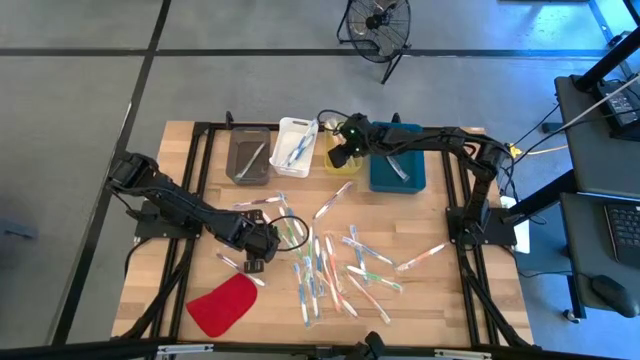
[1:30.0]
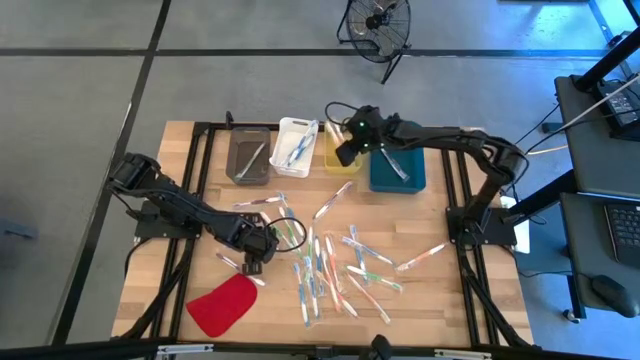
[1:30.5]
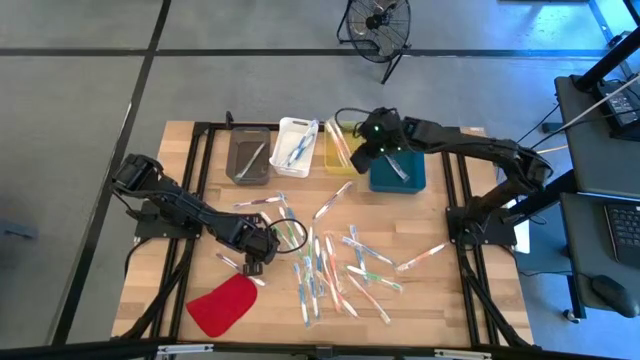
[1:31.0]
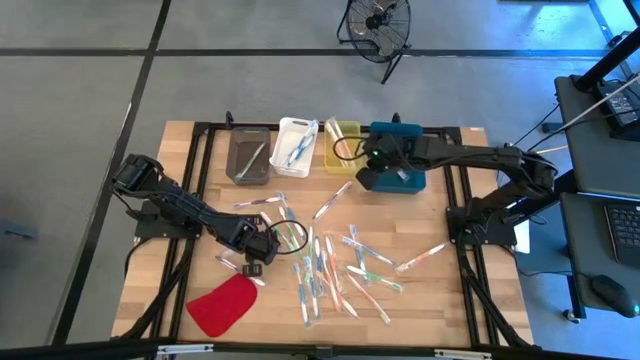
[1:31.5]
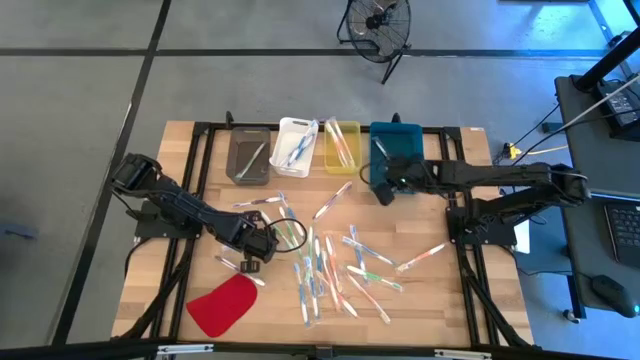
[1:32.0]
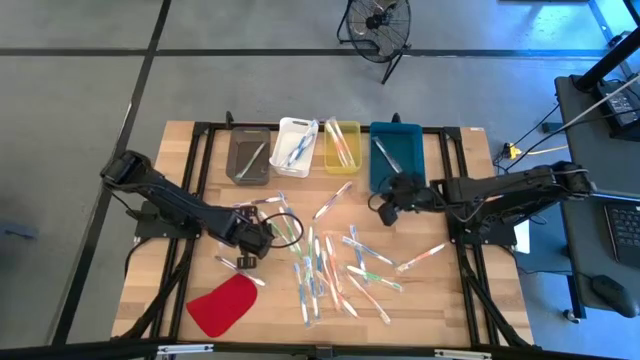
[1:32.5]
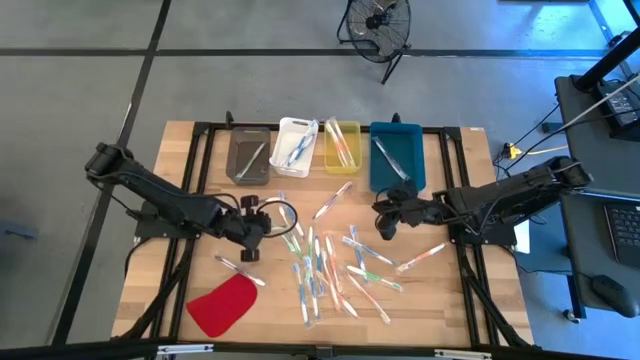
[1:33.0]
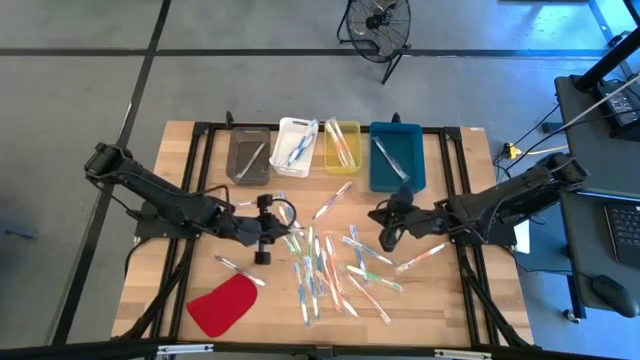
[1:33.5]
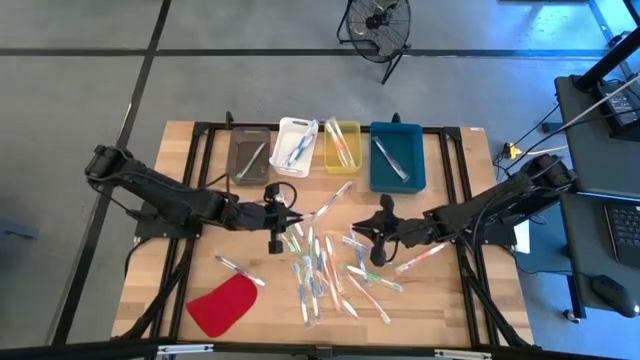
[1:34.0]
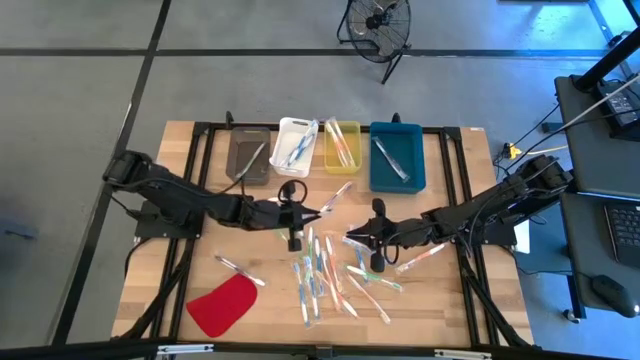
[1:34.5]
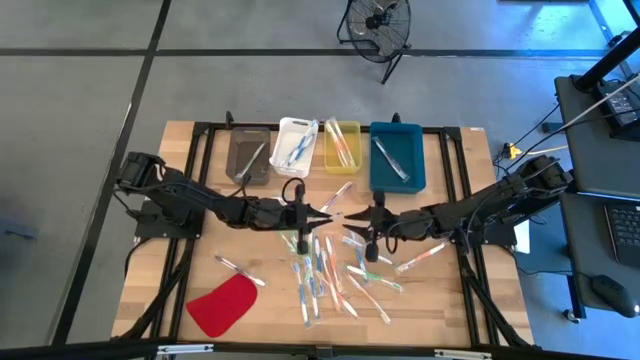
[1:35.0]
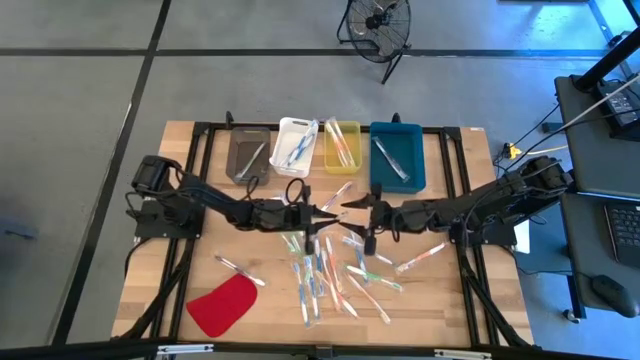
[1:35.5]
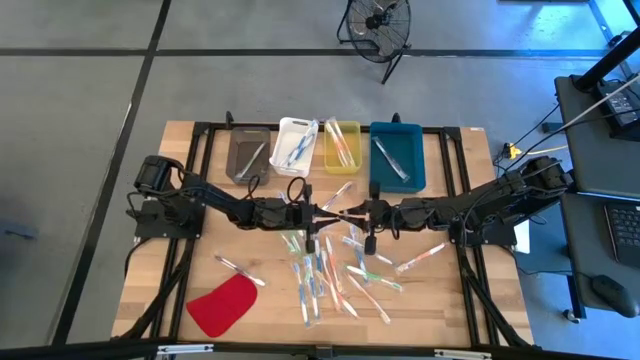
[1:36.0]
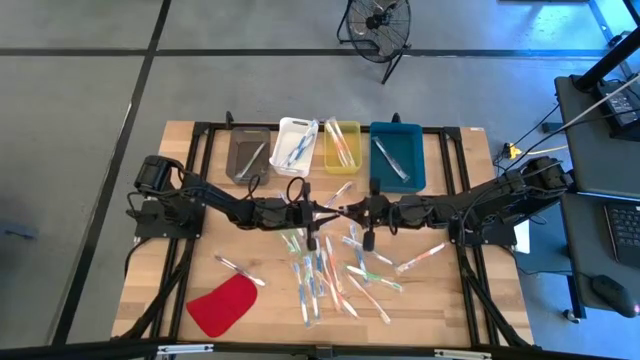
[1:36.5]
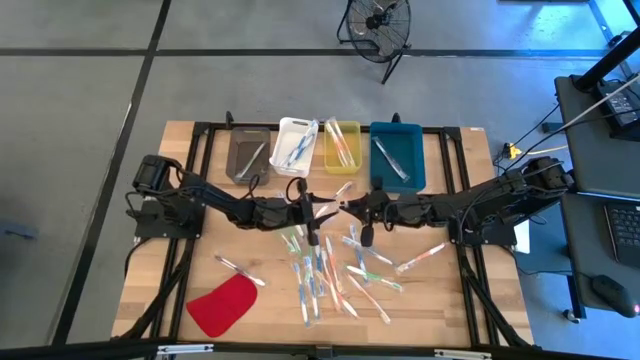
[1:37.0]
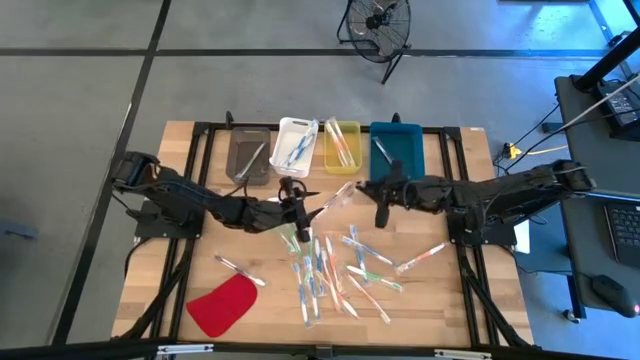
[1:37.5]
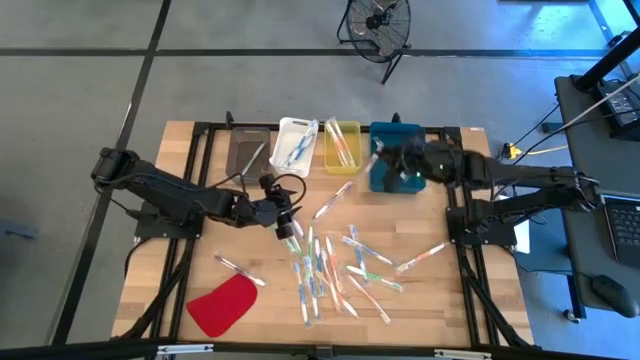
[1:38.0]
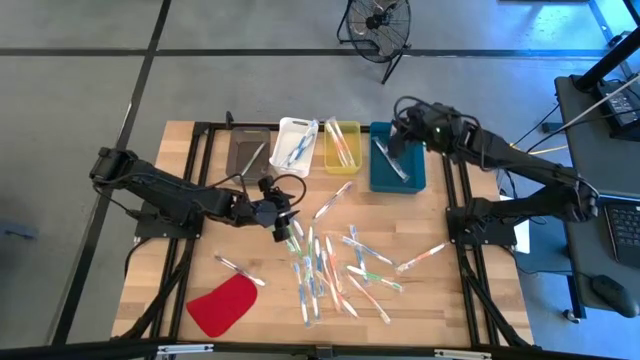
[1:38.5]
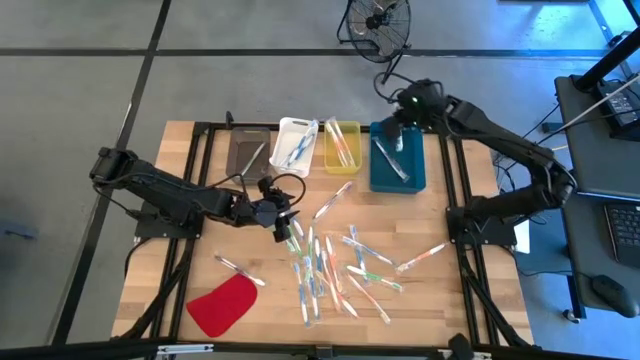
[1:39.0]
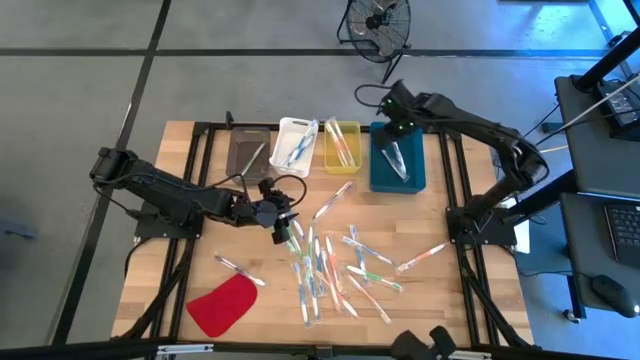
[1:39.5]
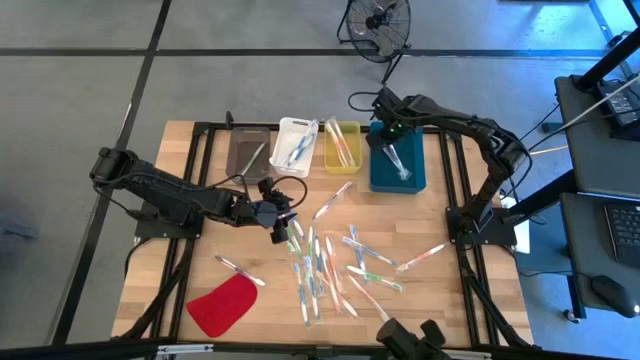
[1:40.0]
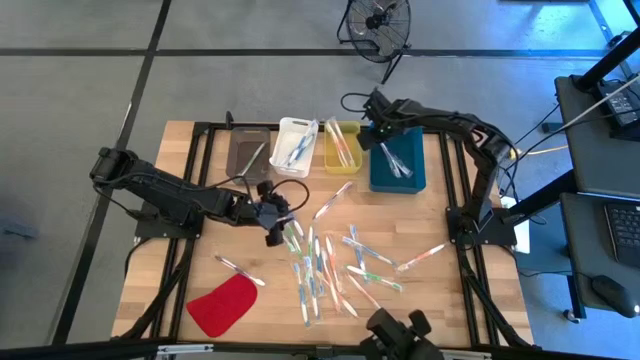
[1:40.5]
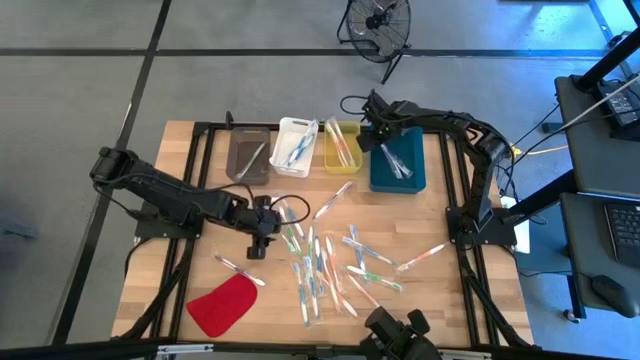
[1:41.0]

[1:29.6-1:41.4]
Task: Pick & Place Toothbrushes
Put the violet toothbrush into the blue bin

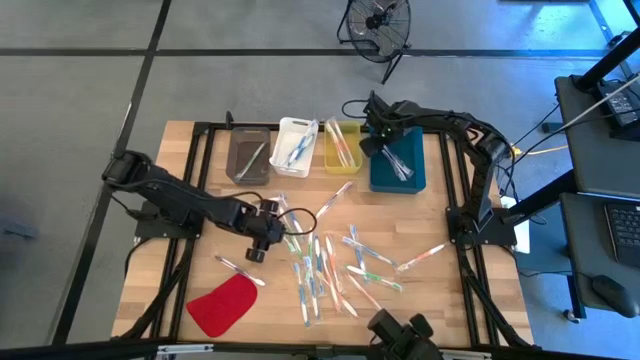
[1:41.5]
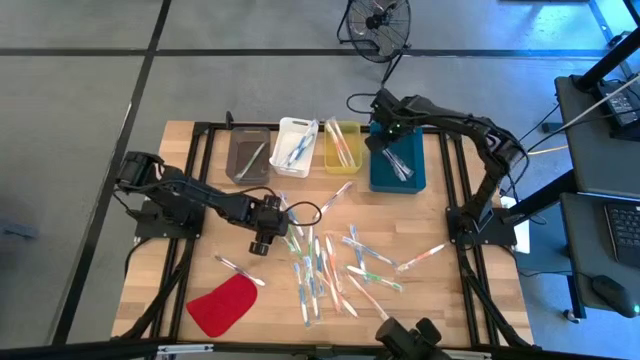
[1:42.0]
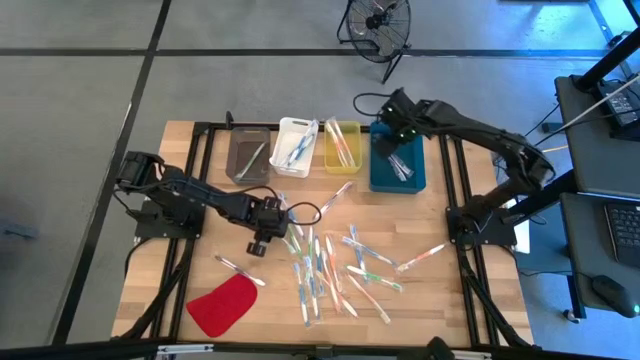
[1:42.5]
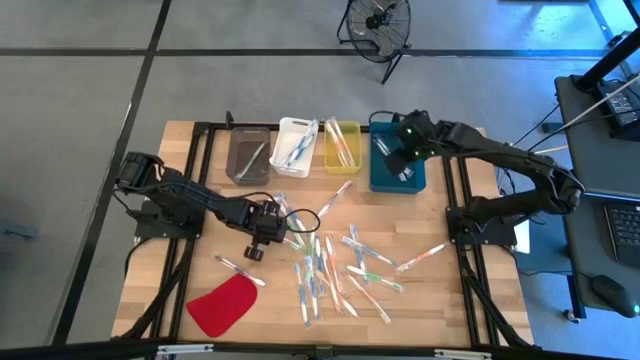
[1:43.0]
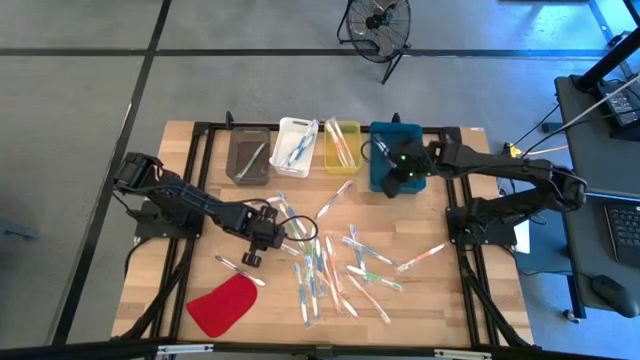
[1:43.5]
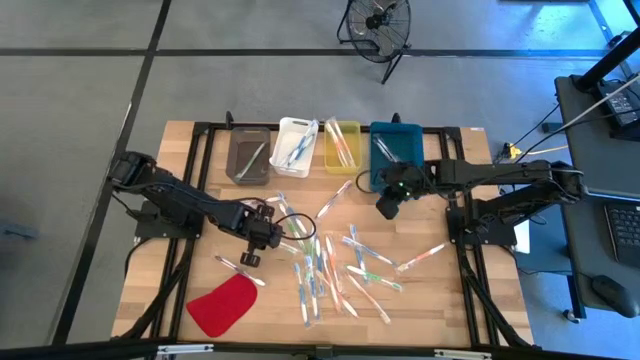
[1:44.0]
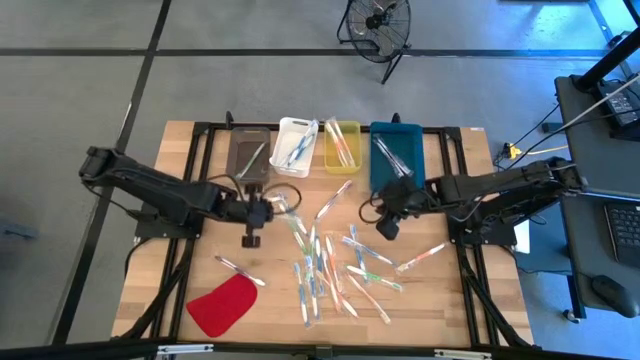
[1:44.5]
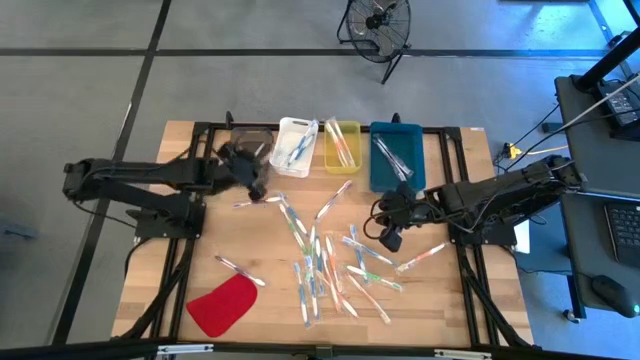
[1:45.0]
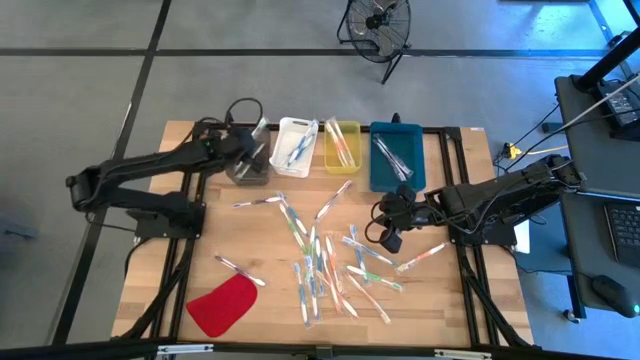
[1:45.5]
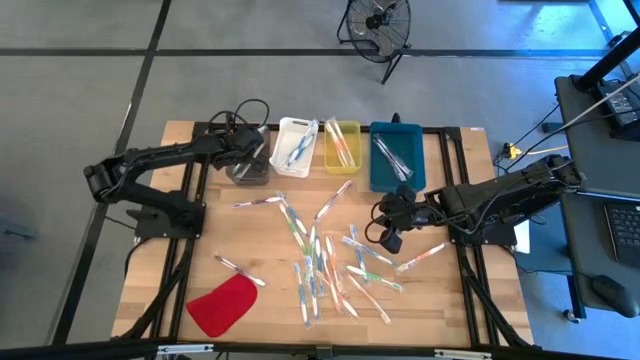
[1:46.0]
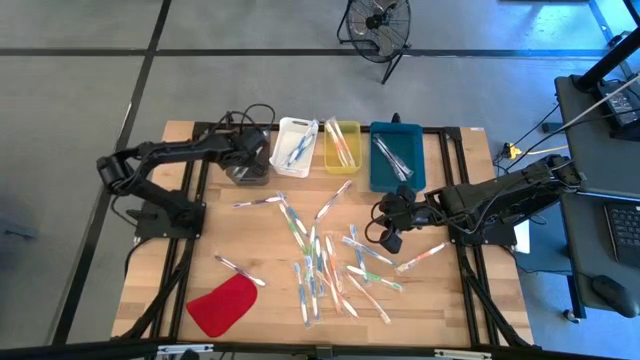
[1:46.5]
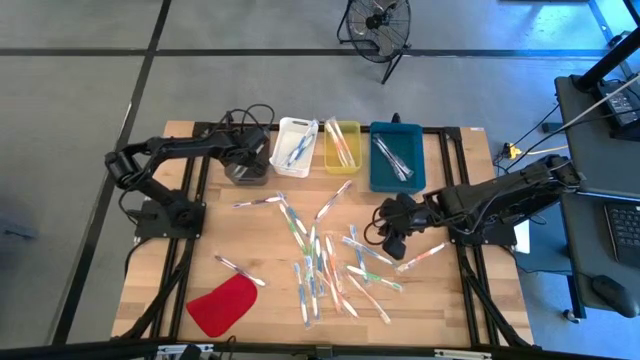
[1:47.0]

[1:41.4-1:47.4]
Put the green toothbrush into the black bin

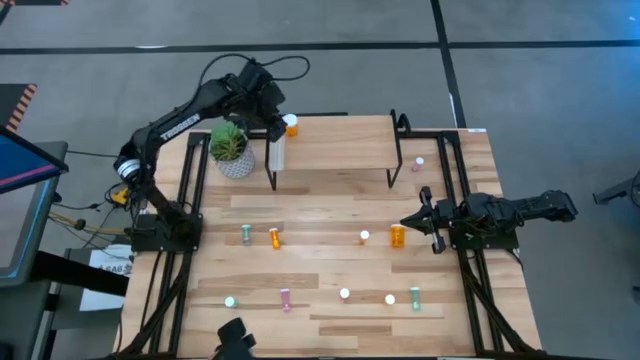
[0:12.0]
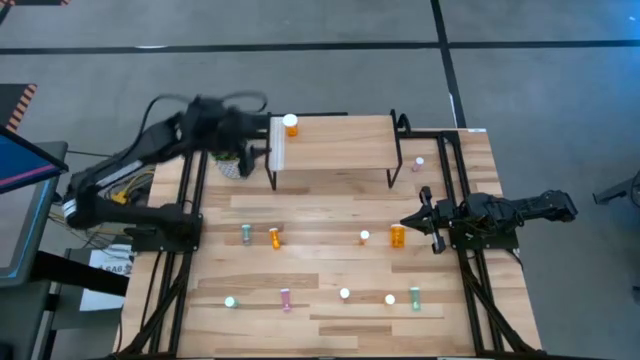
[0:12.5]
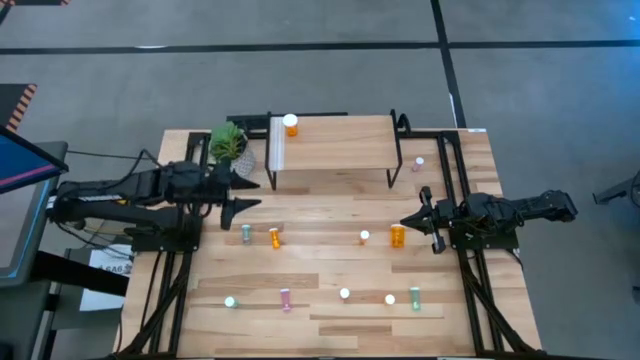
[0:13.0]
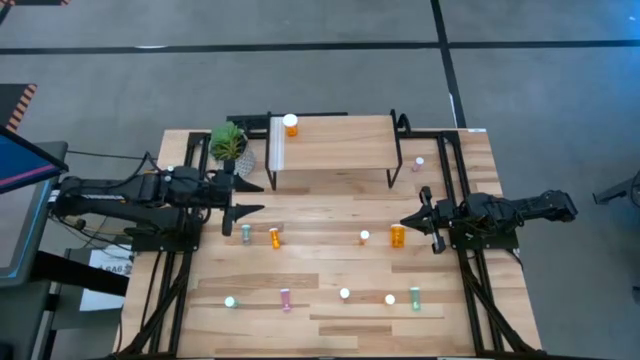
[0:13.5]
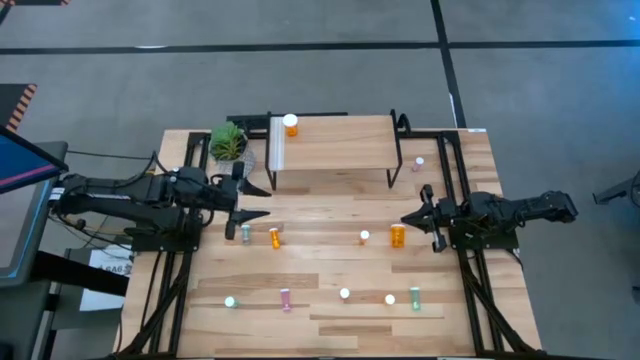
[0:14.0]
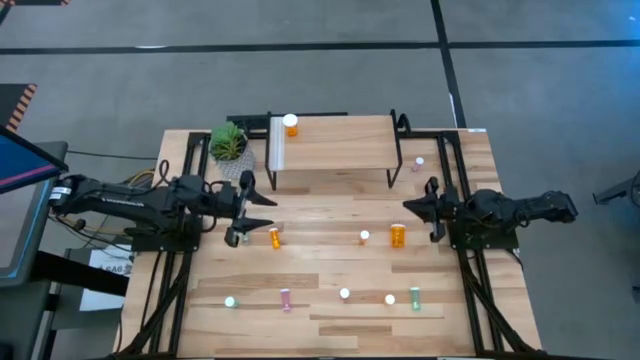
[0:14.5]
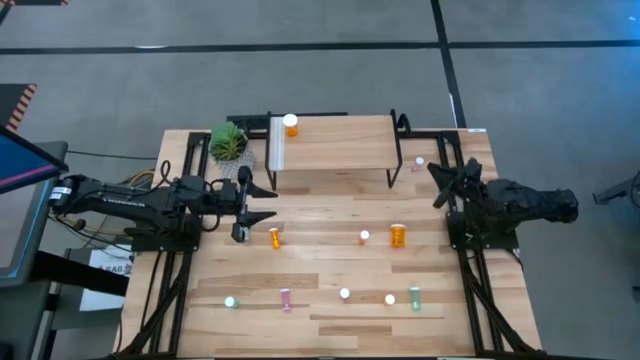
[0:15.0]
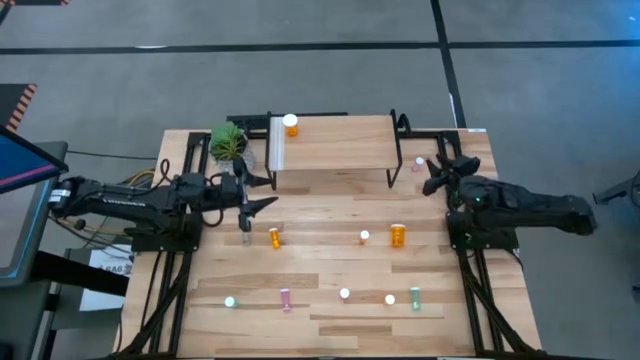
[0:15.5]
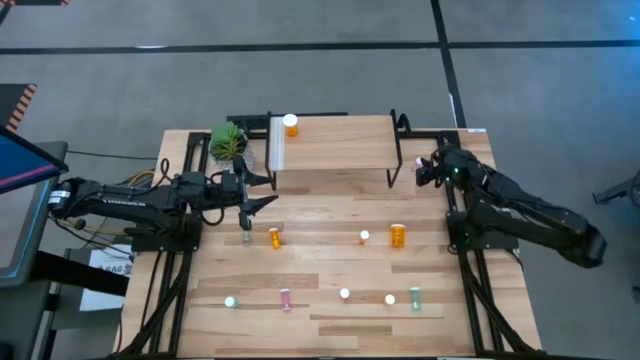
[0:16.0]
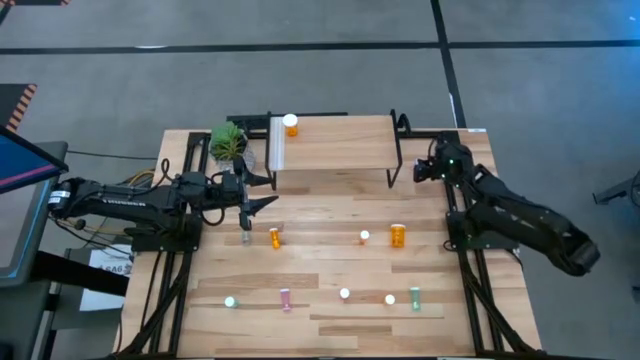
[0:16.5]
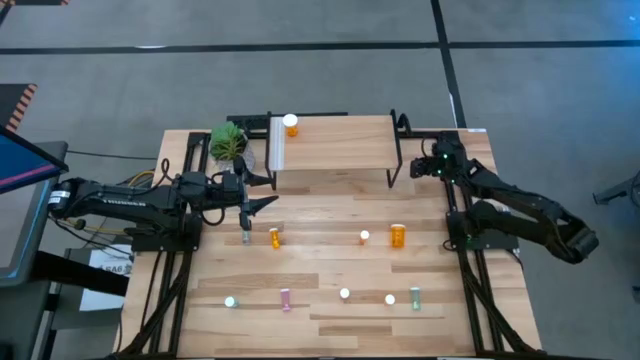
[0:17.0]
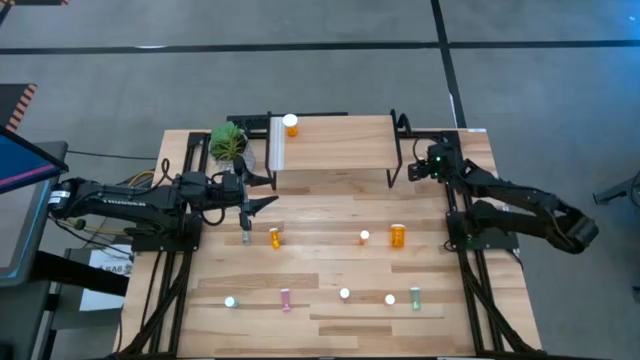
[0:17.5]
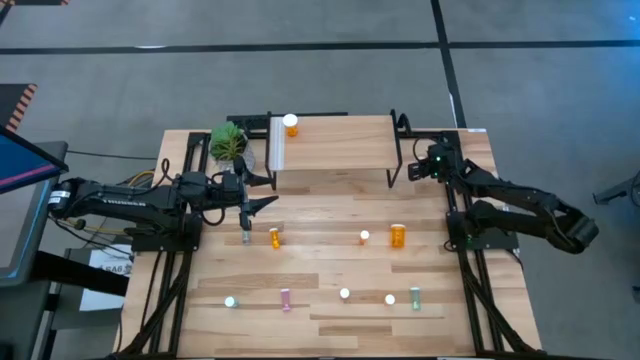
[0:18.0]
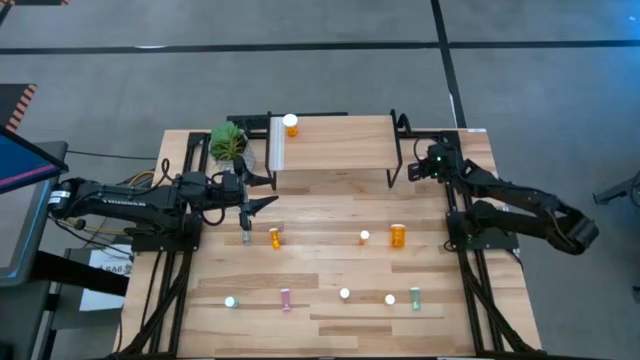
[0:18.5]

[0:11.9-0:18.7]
Task: Pick and place medicine bottles onto shelf by color
Put the top pink pill bottle on the shelf
